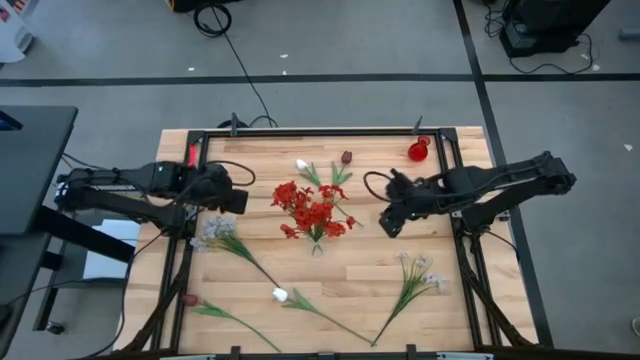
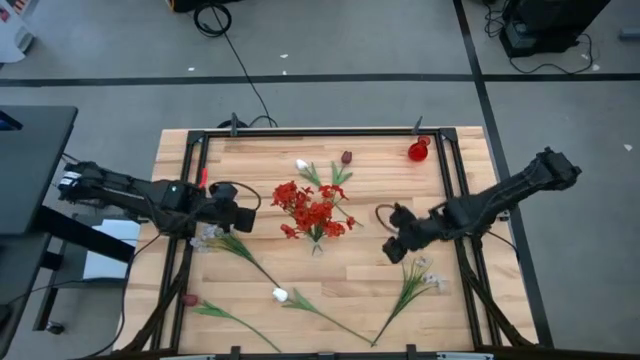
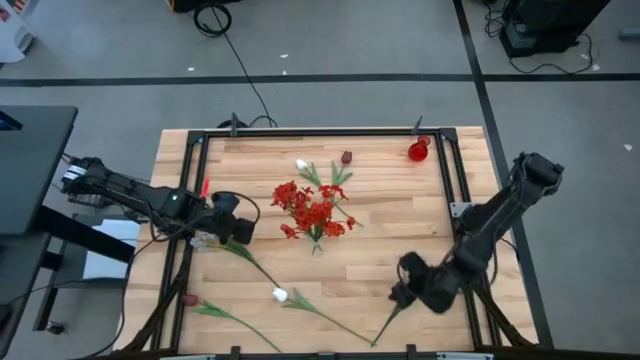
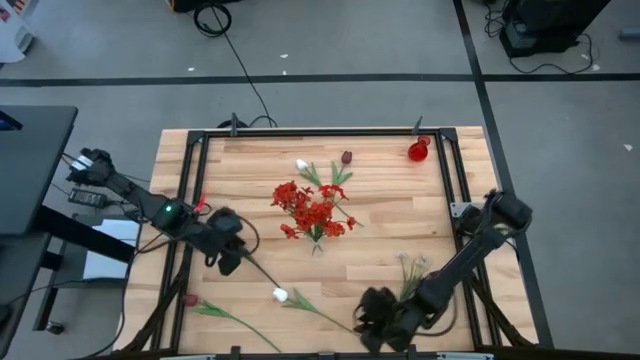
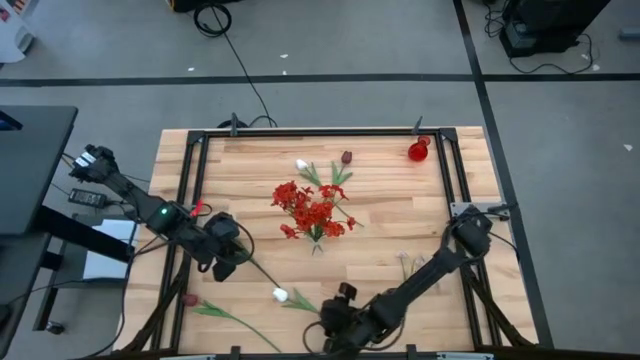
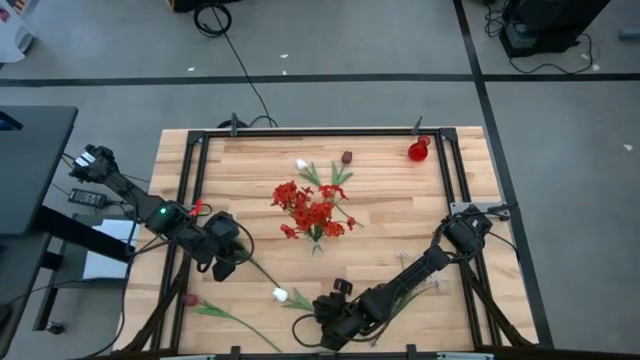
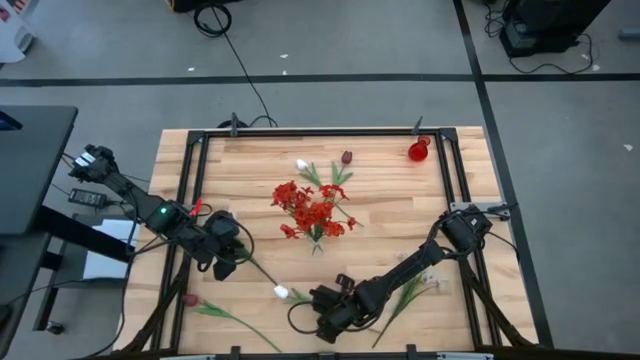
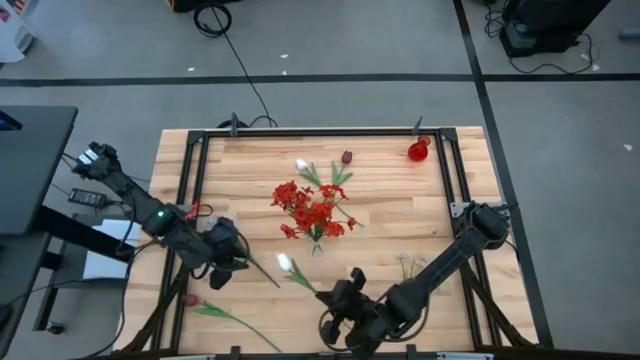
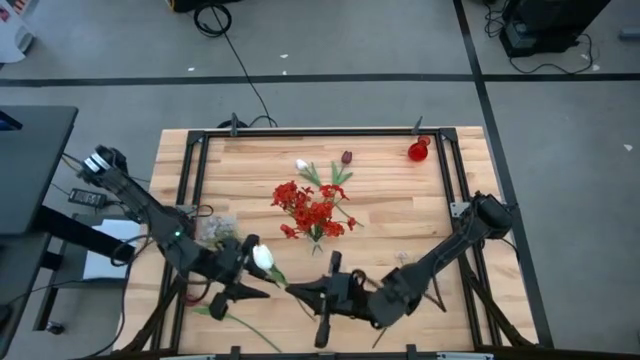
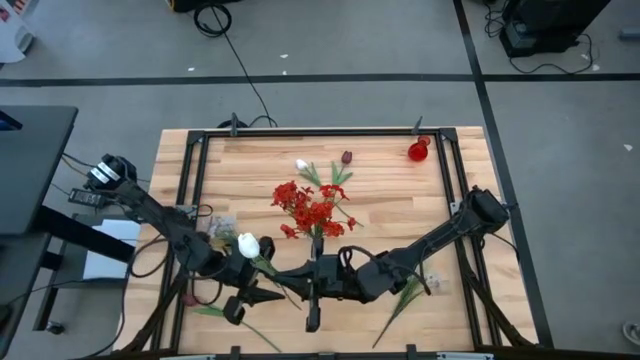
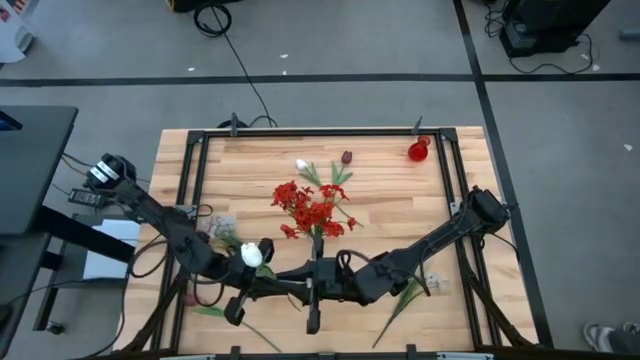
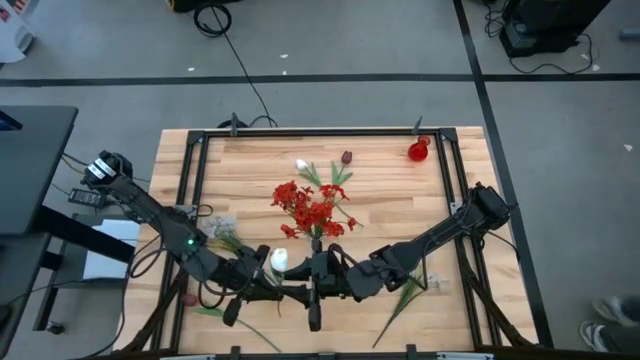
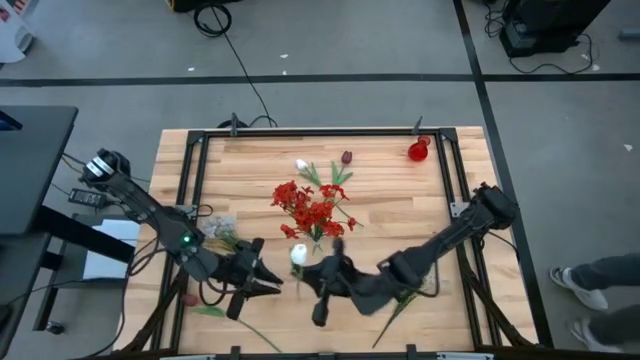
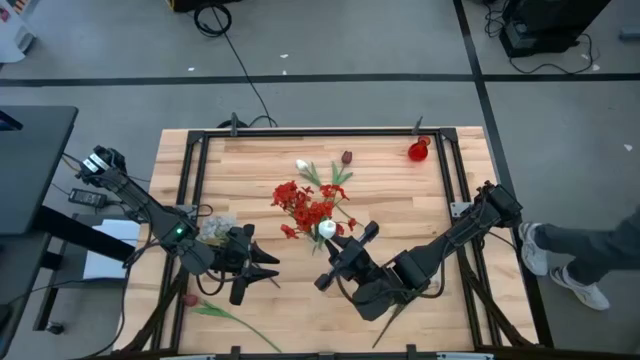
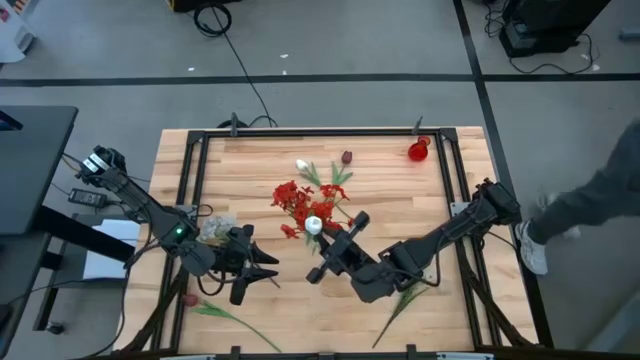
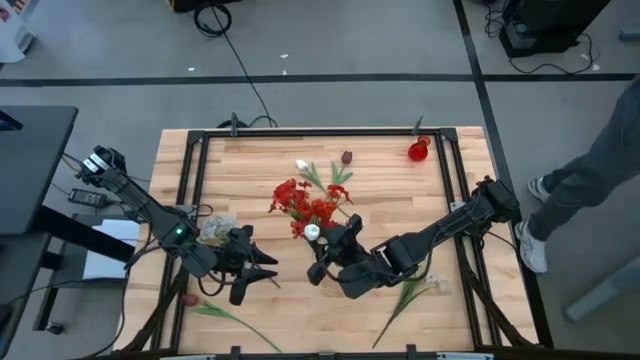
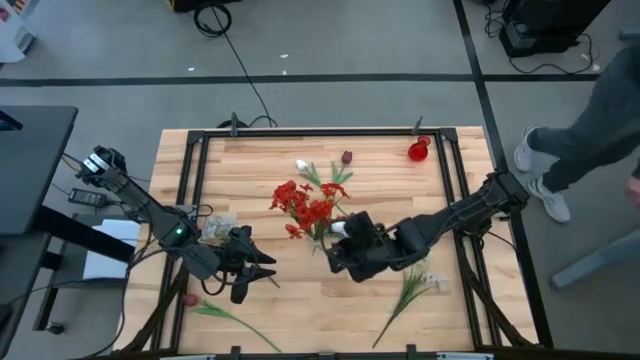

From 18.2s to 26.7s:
Task: Sort flowers into vase by color
Put the bottom white flower into the transparent vase

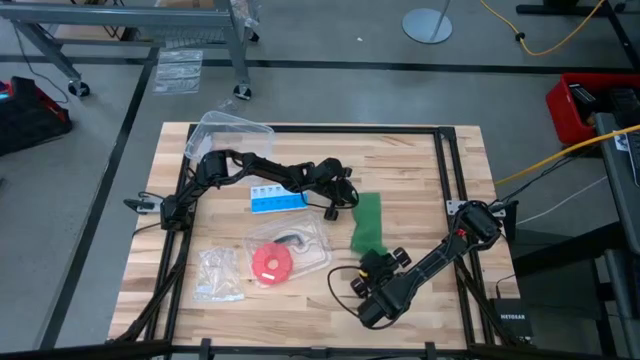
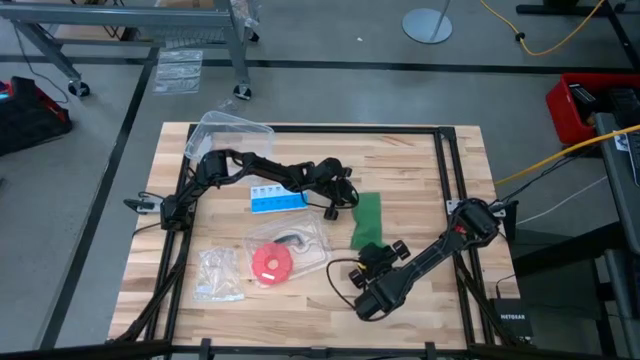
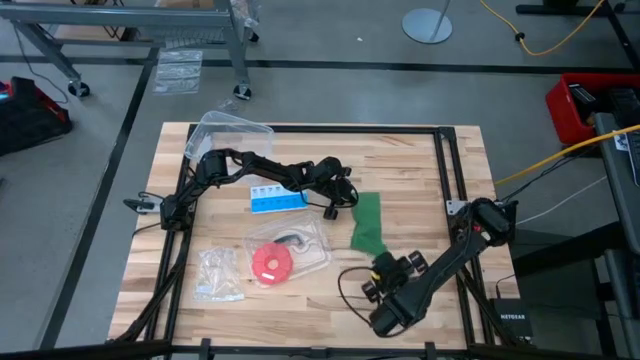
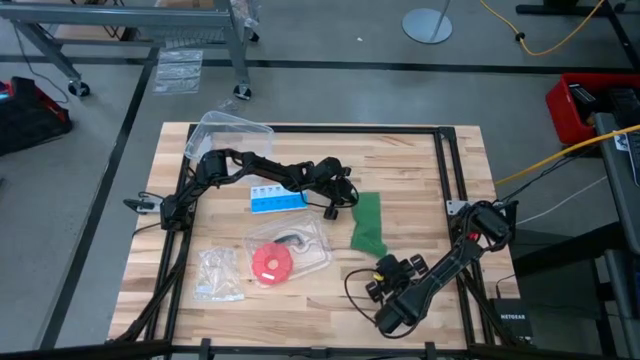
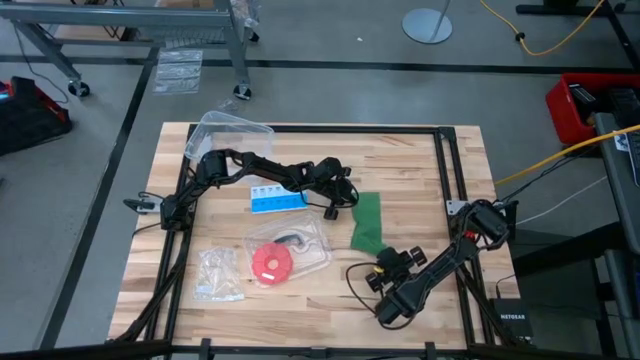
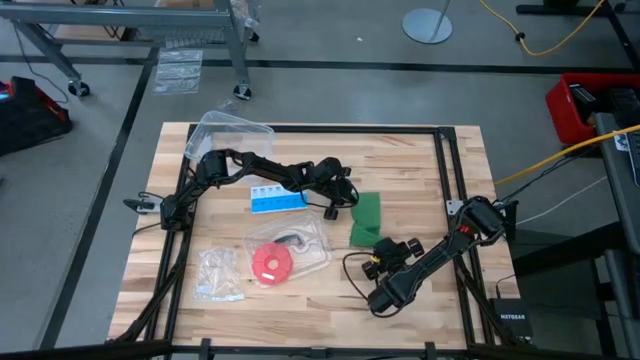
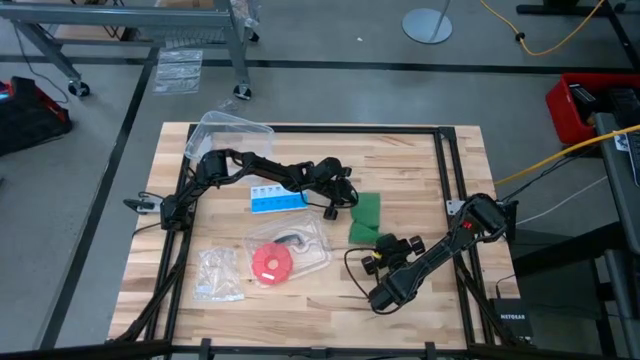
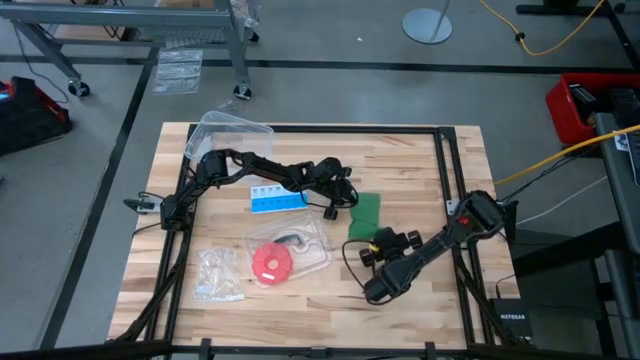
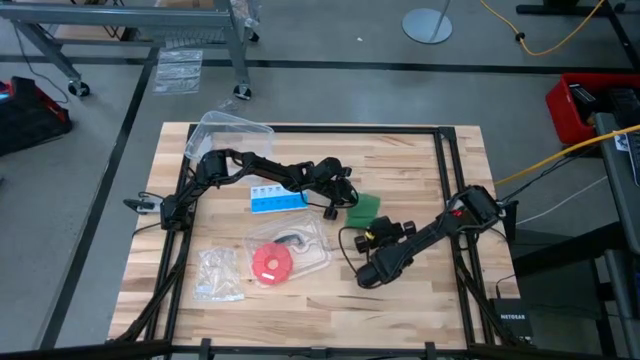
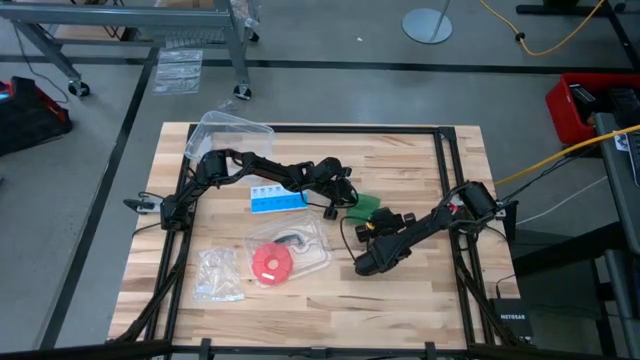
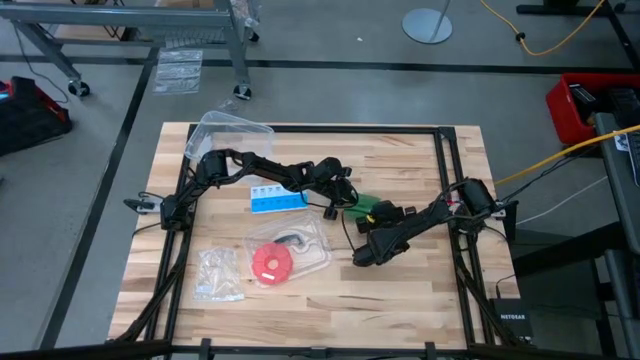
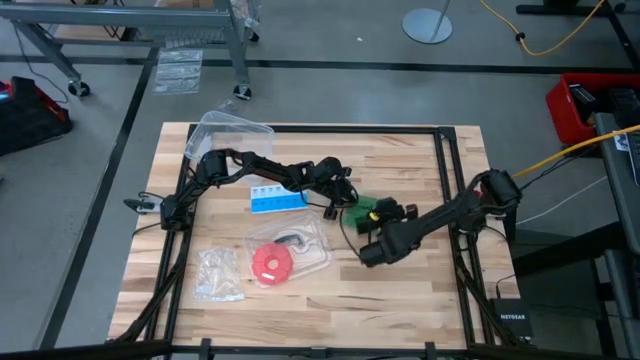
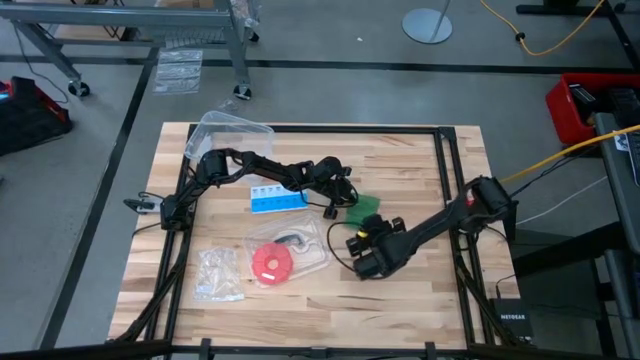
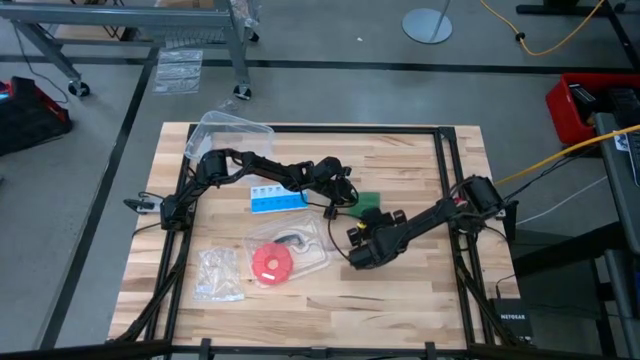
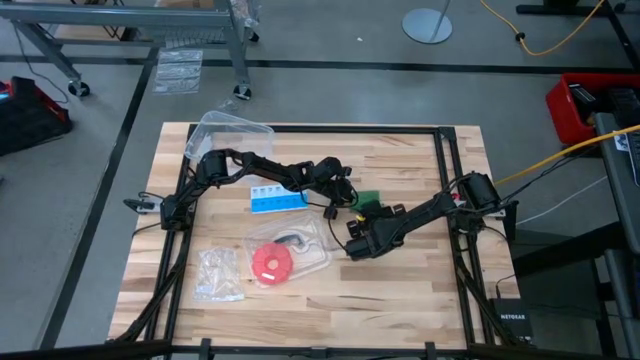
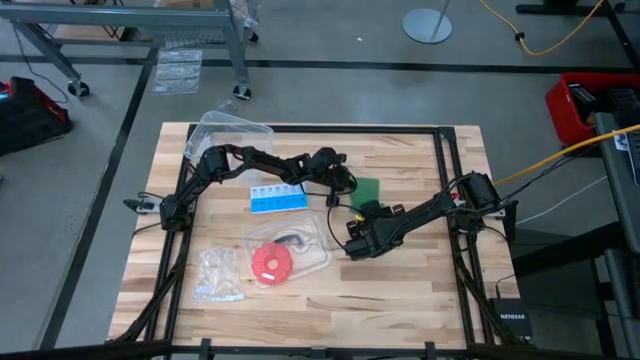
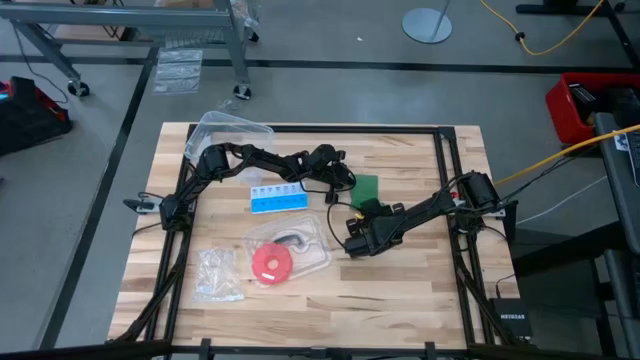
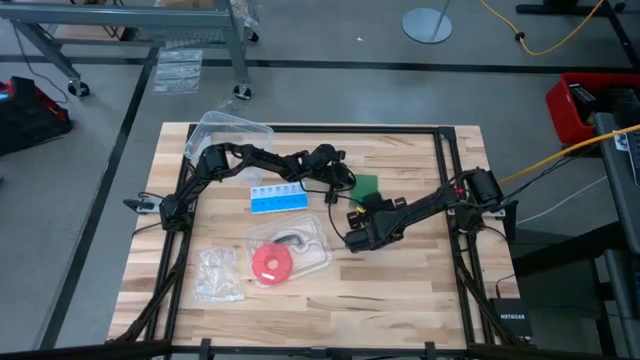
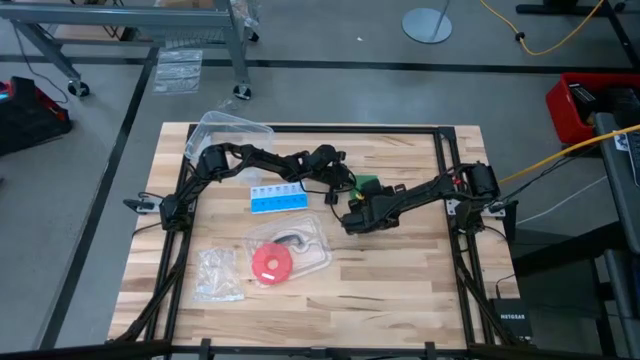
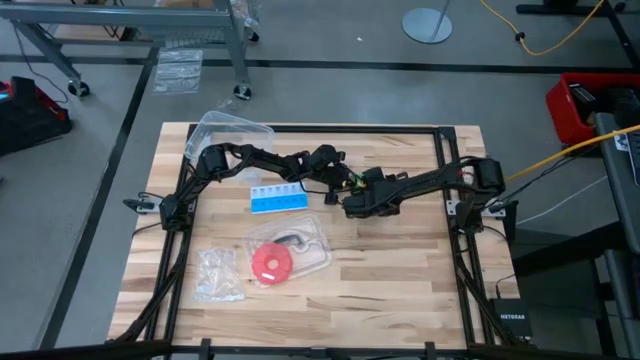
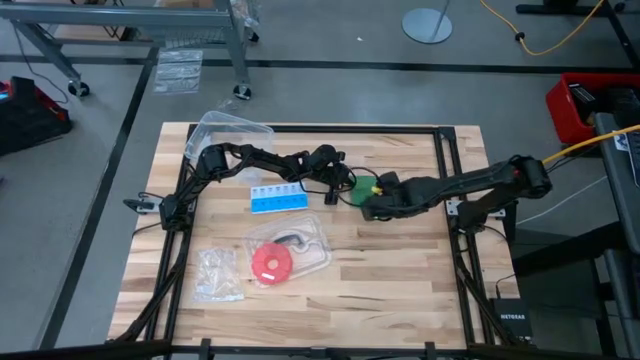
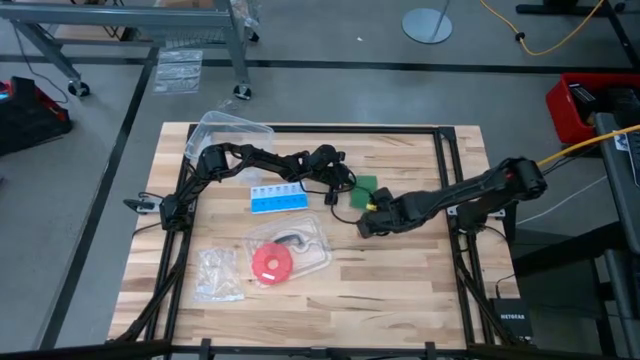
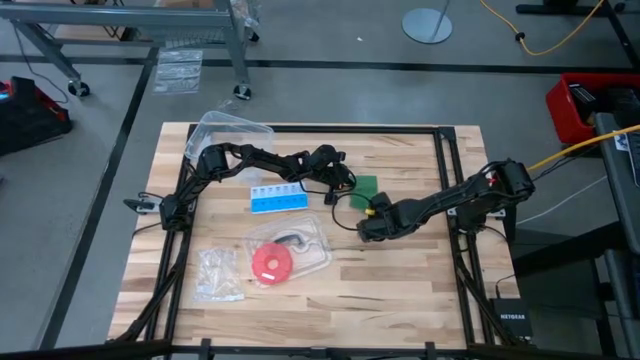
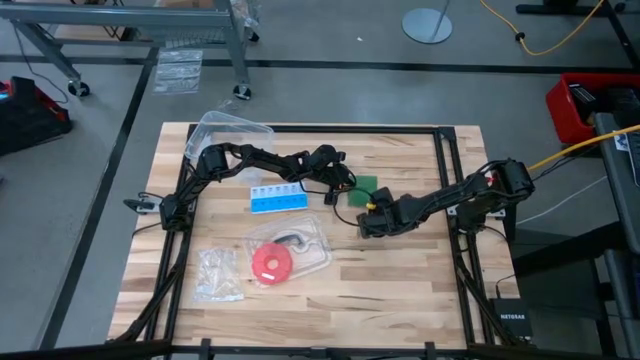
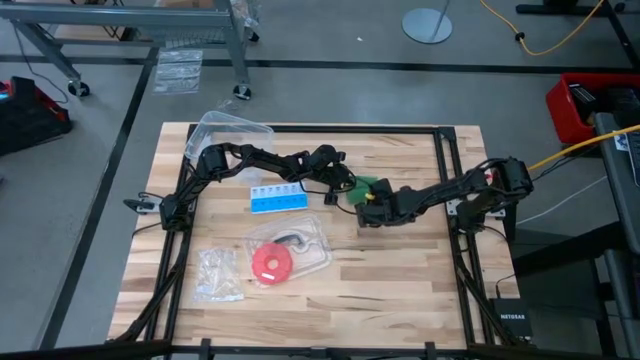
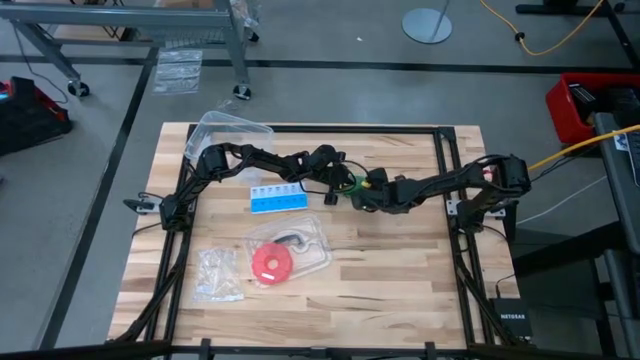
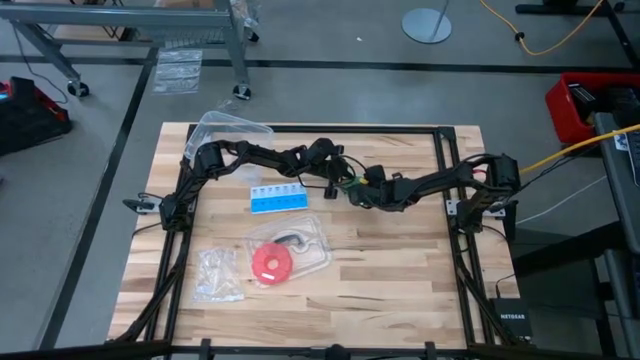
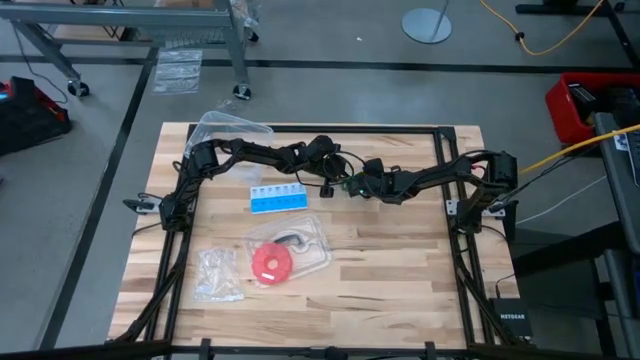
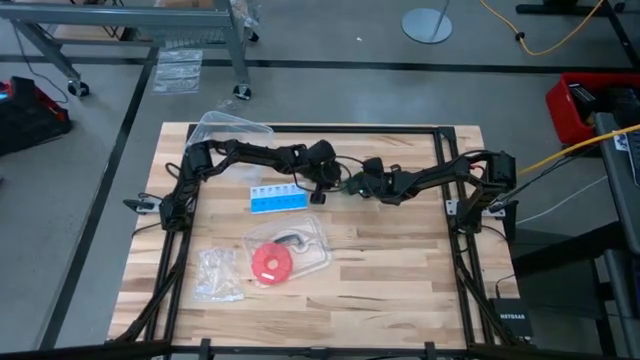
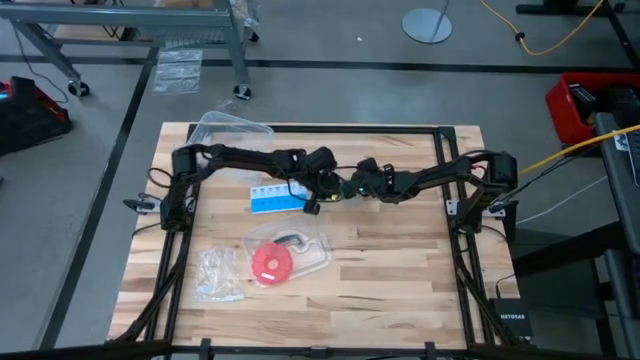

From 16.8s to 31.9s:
Task: Roll bandage
Roll the green bandage
